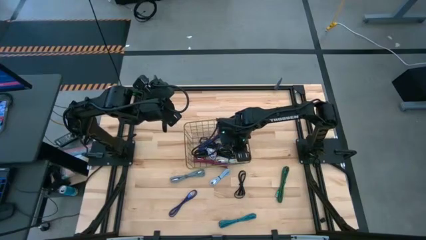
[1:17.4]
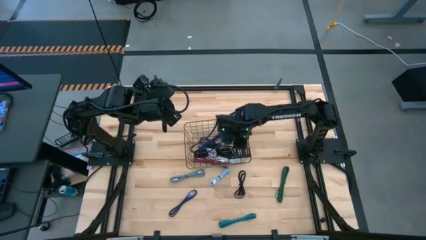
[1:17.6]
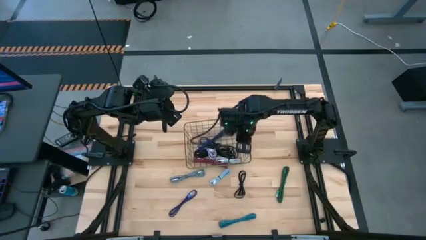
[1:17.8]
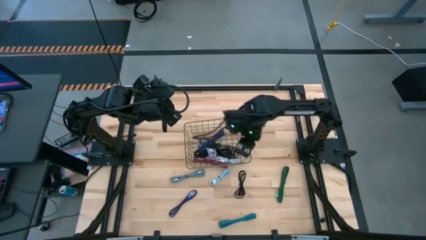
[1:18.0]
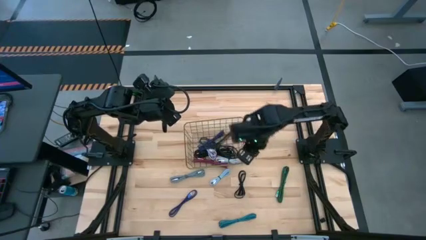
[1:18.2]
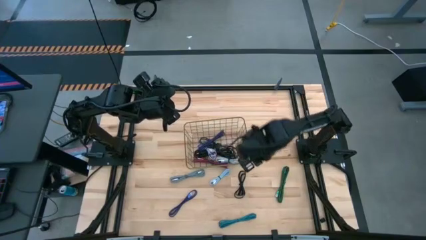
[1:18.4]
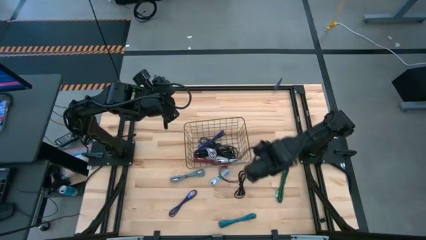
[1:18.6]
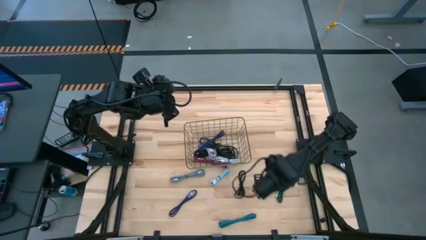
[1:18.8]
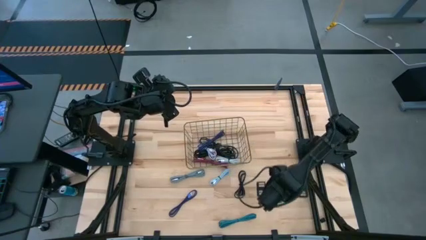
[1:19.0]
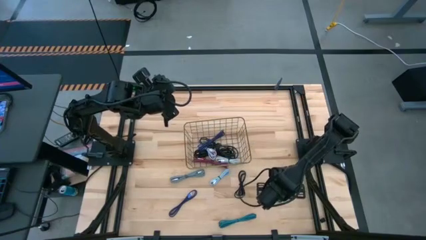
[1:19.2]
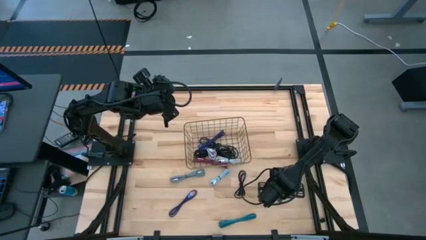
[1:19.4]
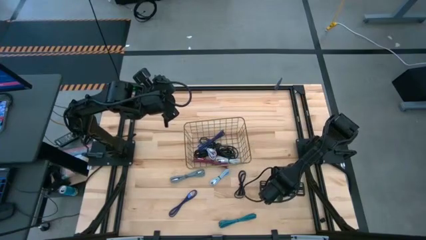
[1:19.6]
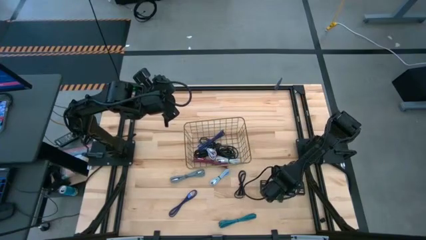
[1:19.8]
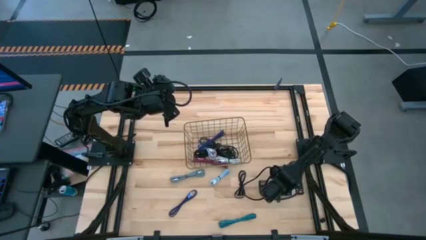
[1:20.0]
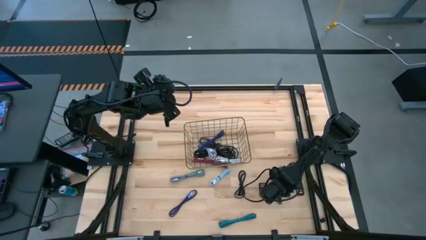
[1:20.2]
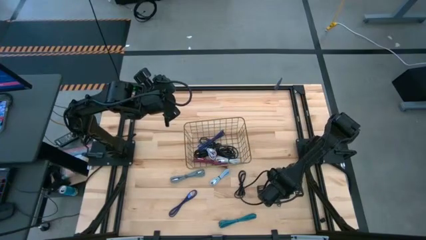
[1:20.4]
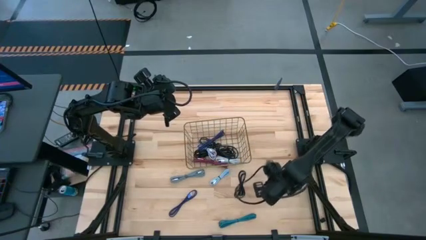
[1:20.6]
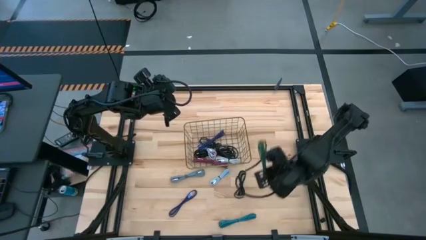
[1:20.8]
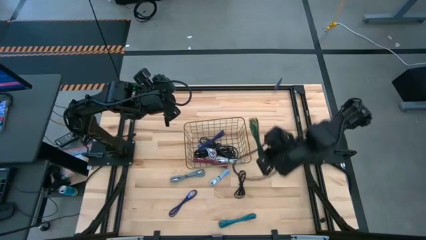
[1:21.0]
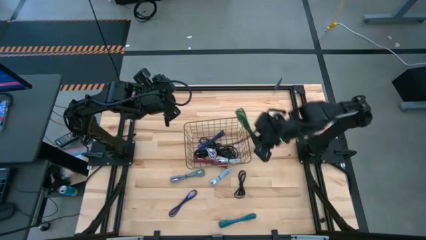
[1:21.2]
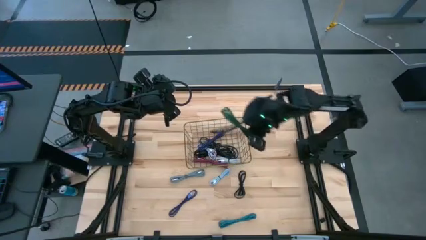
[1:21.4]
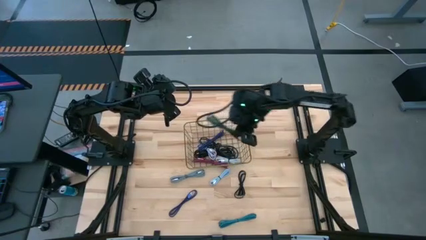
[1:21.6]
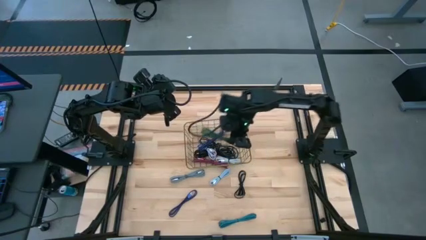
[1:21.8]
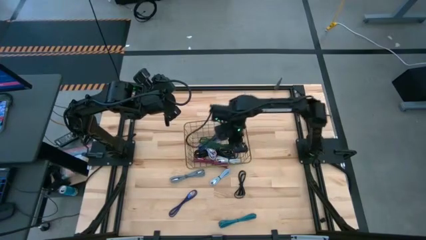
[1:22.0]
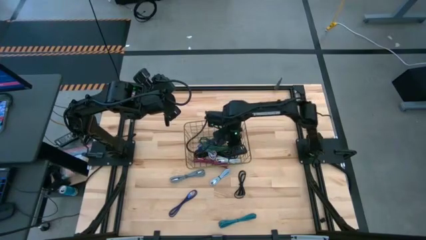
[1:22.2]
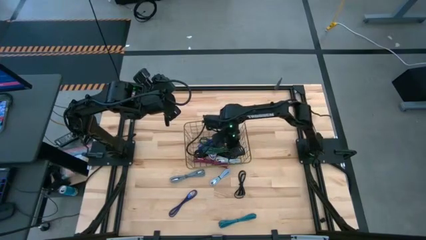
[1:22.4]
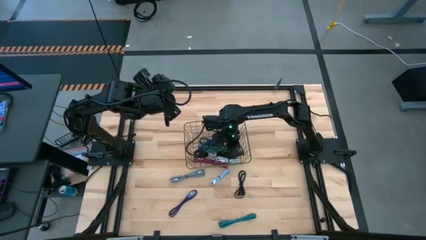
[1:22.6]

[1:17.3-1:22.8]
Task: Pick and place USB-C Cables
Put the green patterned charger cable into the gold wire basket

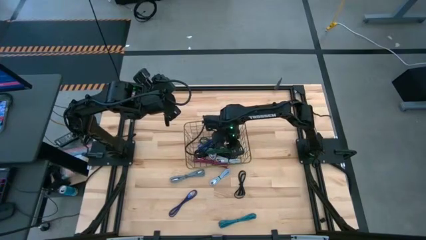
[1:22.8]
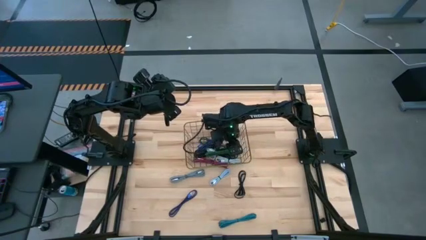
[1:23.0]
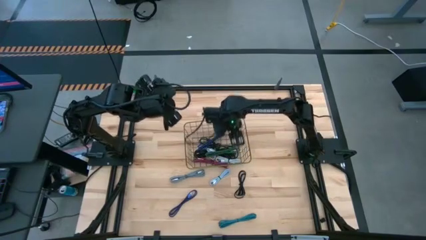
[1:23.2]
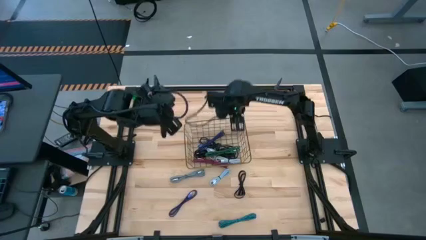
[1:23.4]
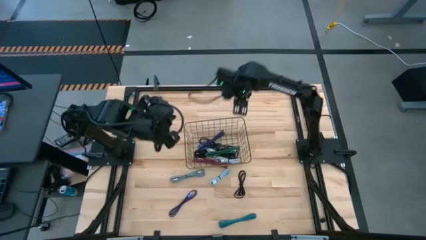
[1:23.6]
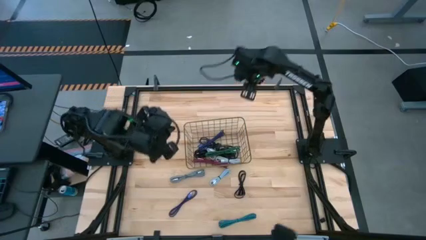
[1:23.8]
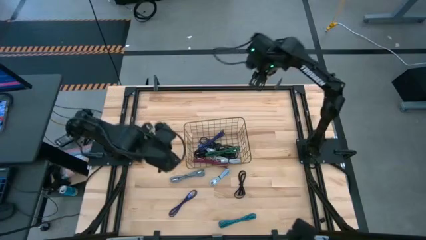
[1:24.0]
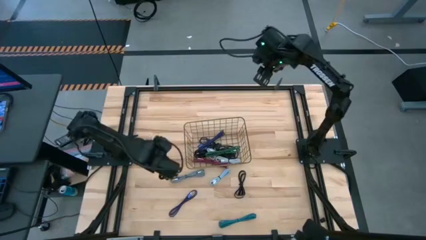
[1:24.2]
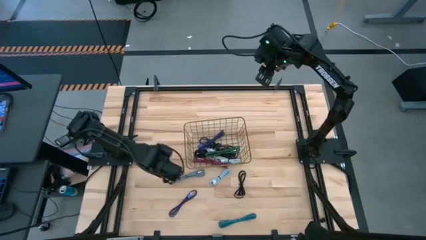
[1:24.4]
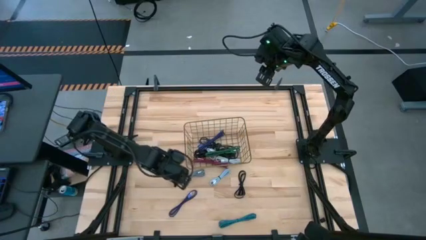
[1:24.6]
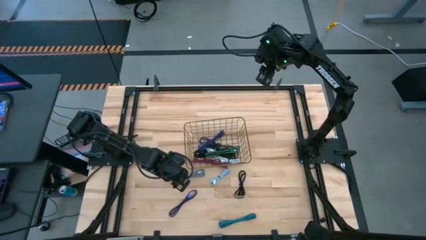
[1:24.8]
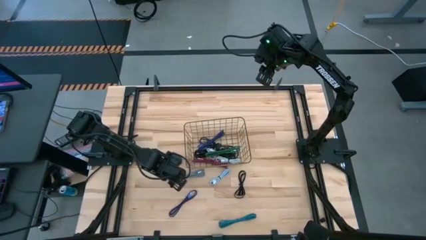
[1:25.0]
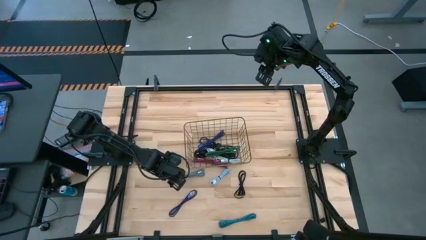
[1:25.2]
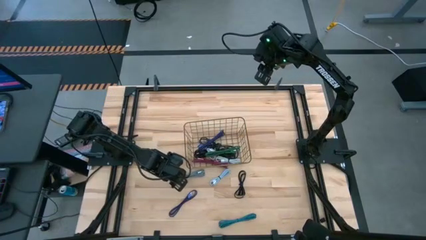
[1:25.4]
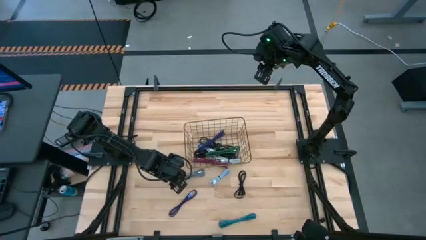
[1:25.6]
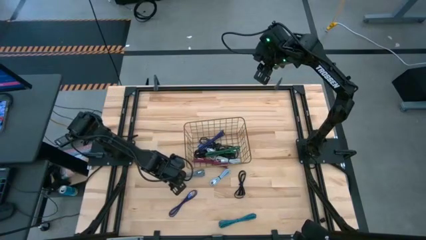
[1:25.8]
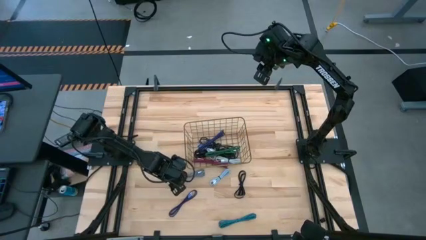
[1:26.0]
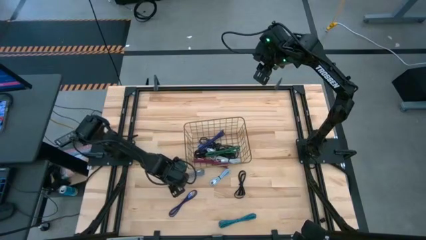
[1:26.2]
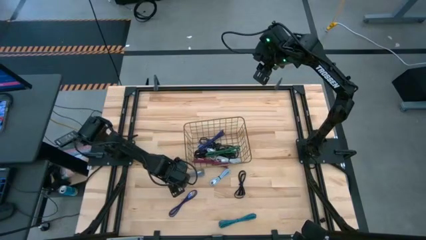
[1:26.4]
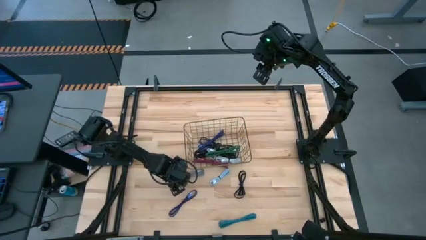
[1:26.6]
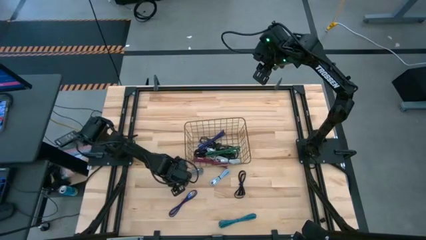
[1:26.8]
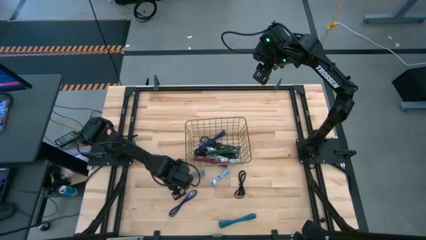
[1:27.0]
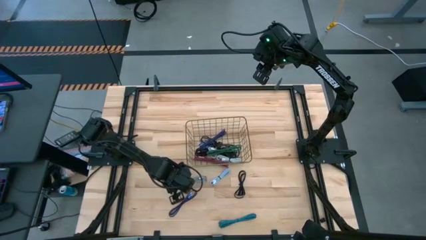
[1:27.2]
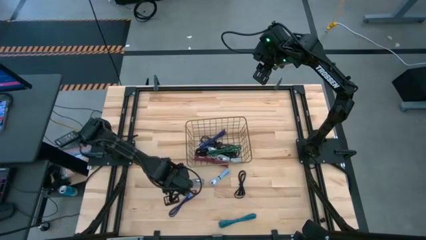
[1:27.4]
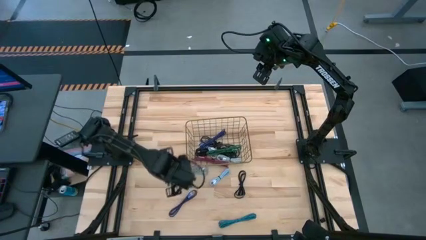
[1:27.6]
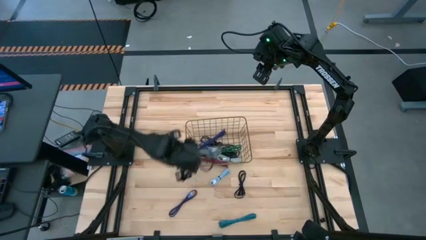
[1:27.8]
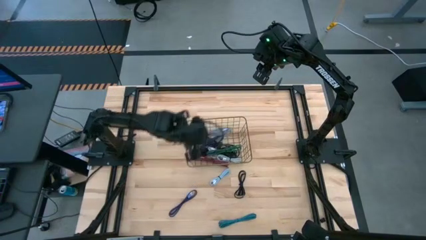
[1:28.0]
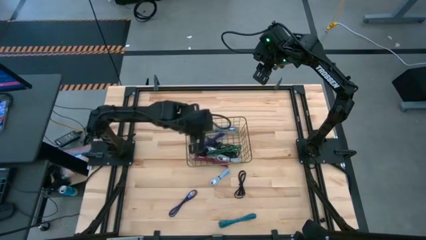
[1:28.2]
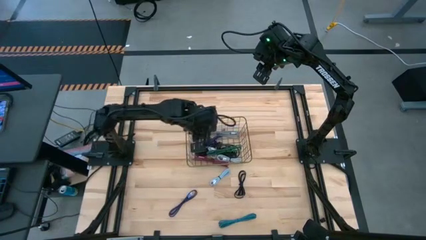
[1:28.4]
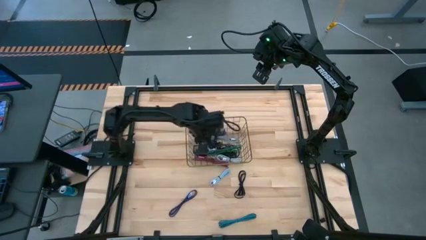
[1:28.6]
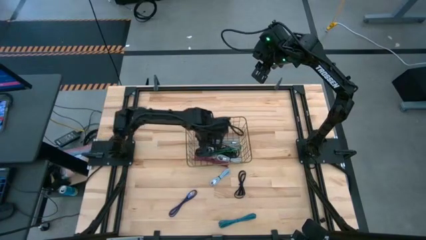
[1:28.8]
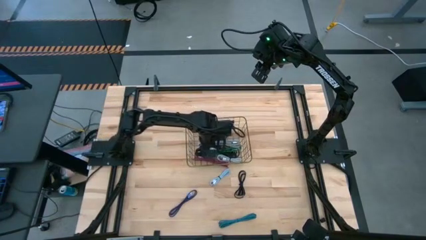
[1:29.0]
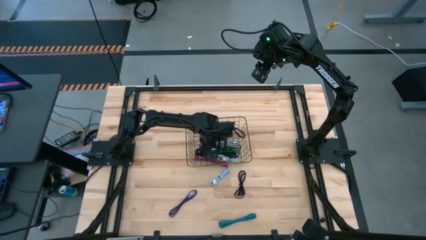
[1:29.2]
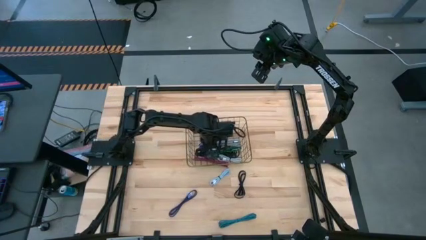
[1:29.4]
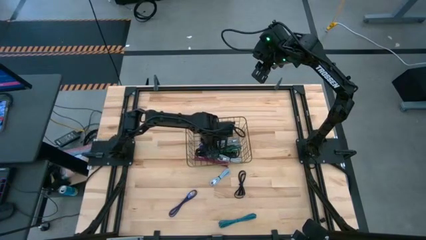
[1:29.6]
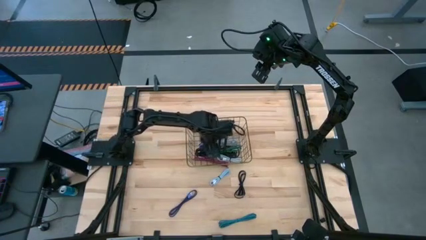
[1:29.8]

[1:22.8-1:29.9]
Put the black patterned charger cable into the gold wire basket

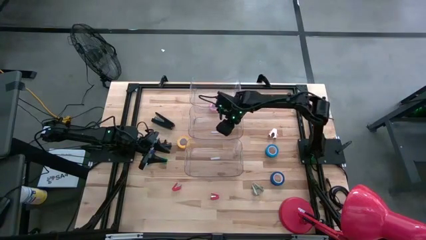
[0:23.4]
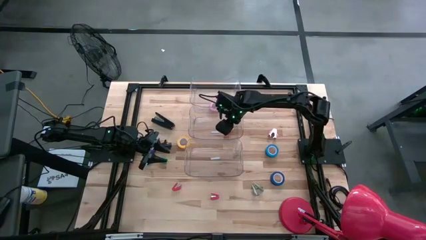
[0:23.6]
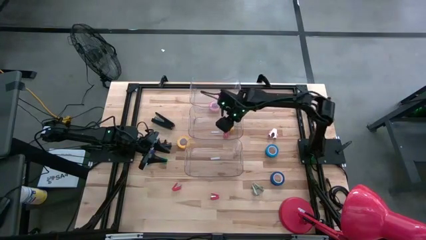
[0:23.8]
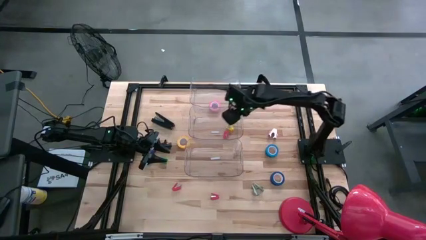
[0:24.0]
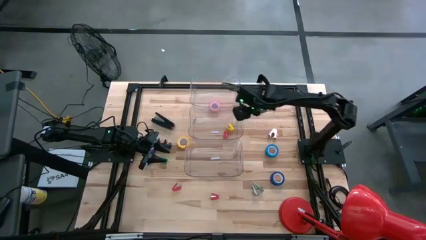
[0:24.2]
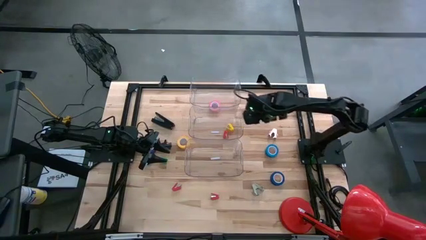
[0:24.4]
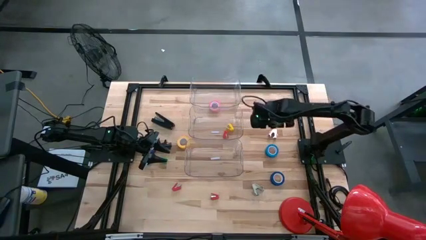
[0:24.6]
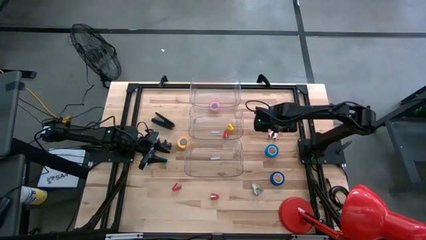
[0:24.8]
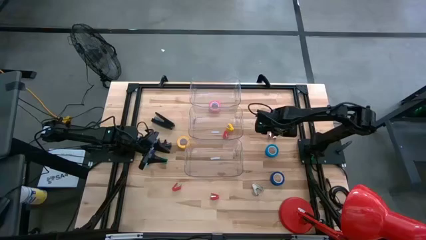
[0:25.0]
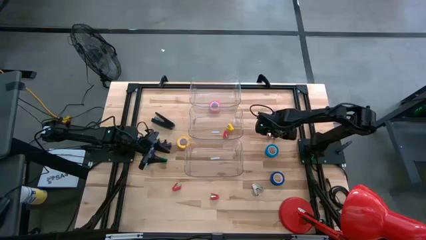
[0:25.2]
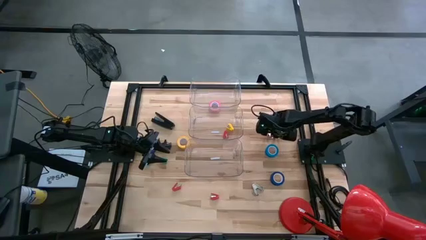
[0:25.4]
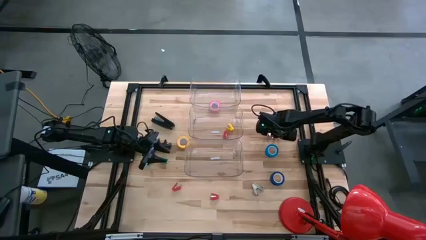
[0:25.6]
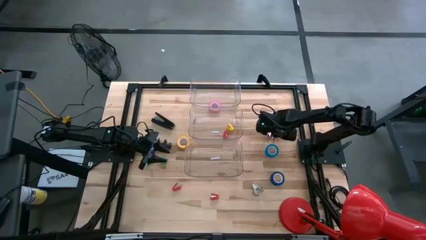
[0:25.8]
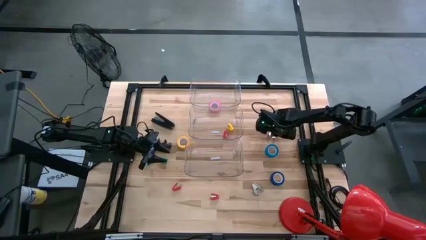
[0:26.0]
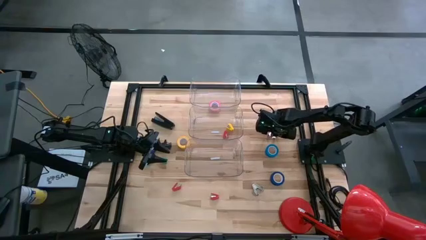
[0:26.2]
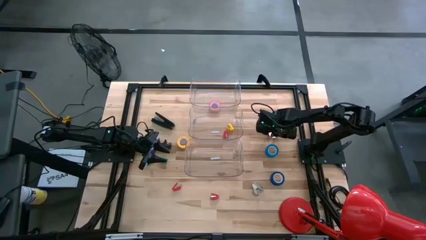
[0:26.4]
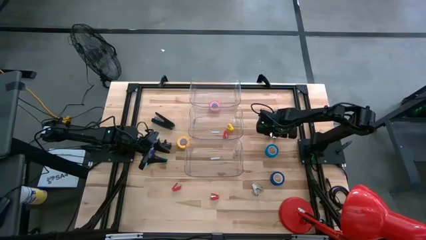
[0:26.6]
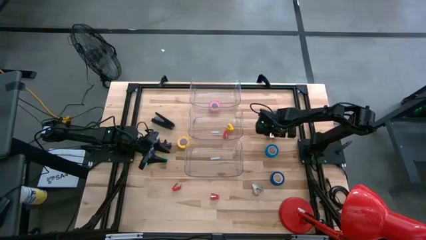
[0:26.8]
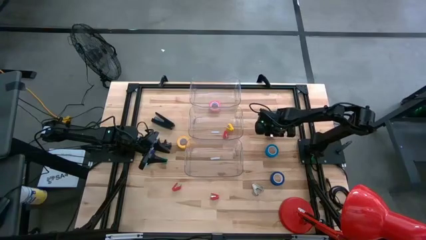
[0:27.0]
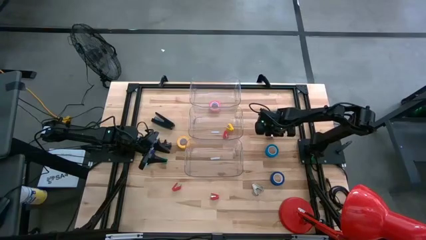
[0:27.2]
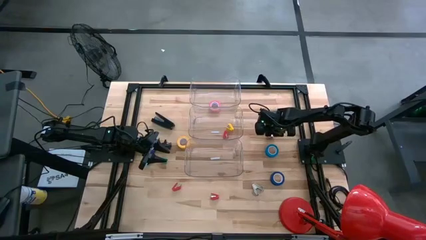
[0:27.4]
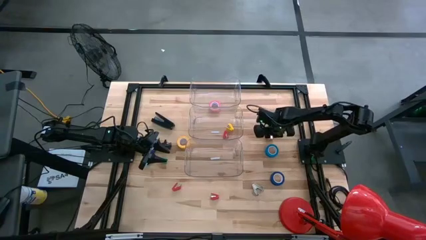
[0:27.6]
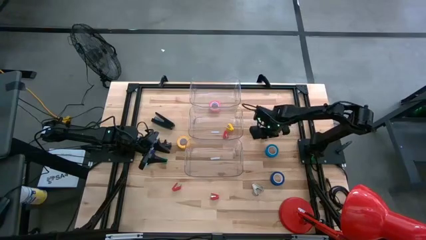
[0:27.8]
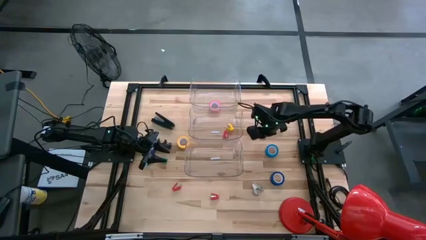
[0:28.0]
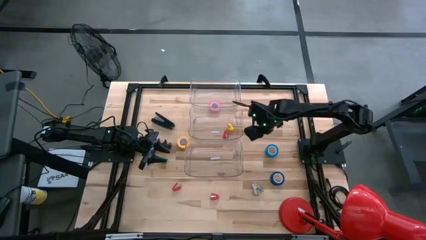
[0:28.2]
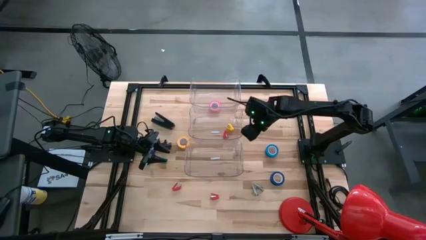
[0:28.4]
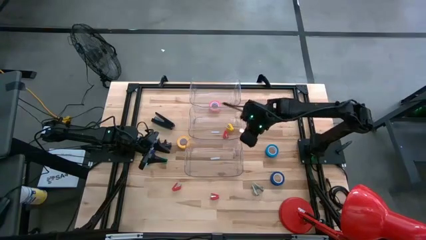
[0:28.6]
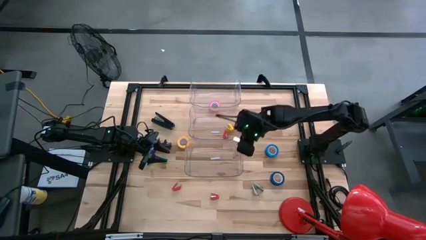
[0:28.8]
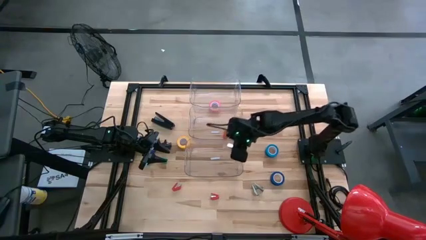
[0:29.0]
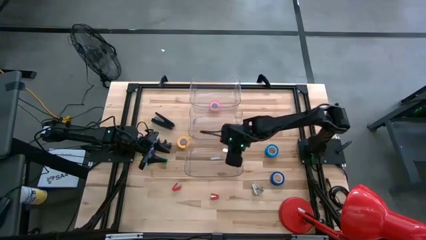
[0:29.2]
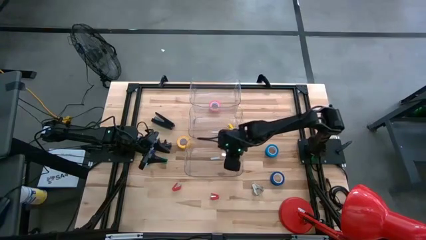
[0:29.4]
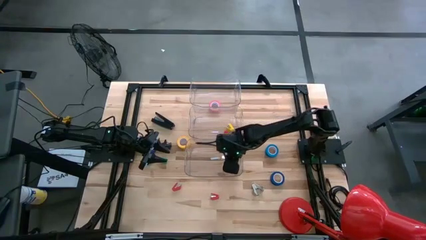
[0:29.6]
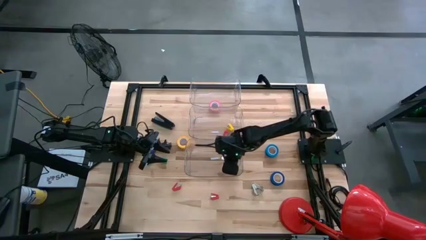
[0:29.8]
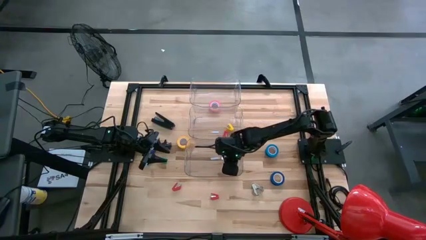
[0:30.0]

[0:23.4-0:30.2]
Task: Pick and place Stapler, Stapler remover, tape
Put the pink staple remover into the bottom transparent bin
